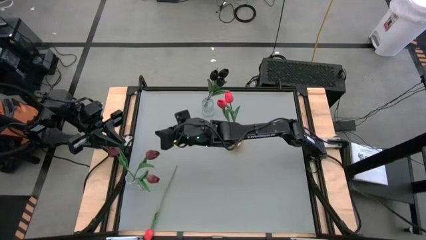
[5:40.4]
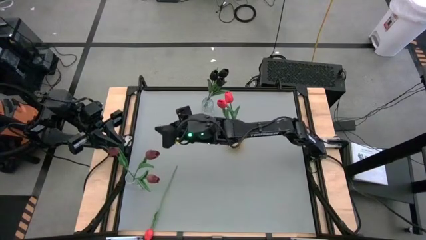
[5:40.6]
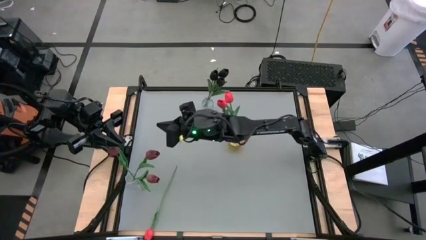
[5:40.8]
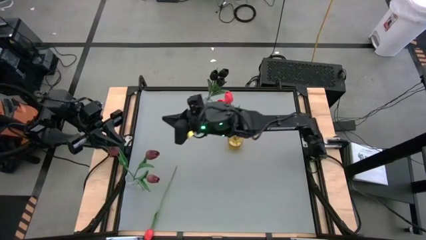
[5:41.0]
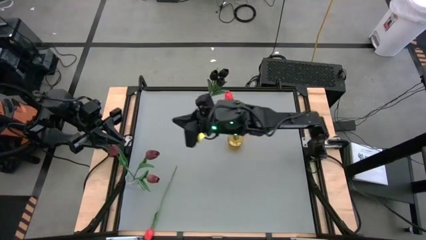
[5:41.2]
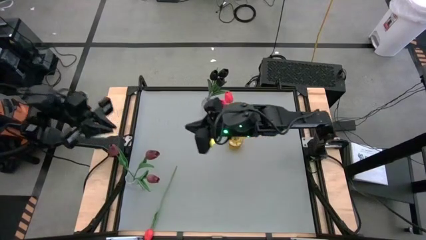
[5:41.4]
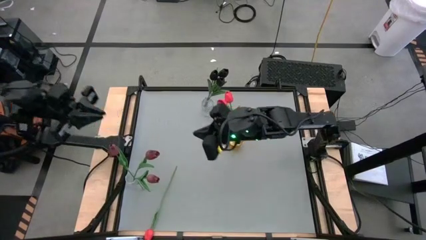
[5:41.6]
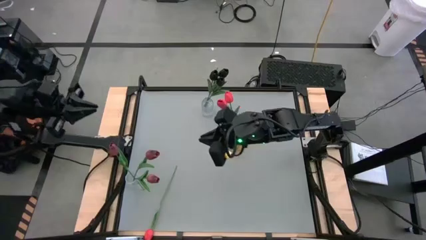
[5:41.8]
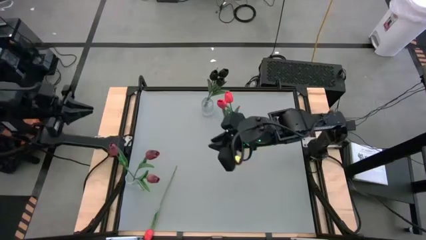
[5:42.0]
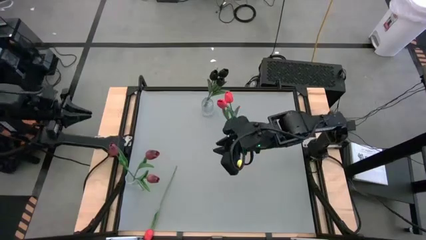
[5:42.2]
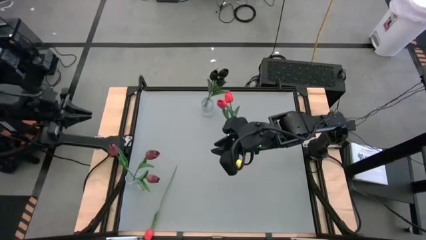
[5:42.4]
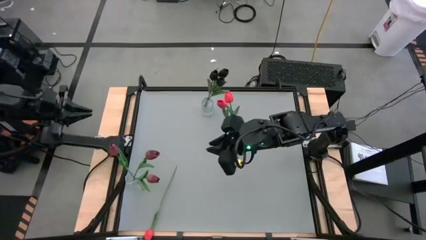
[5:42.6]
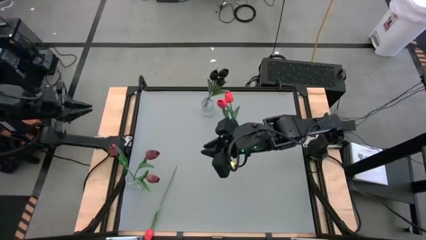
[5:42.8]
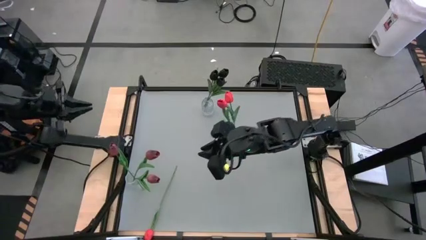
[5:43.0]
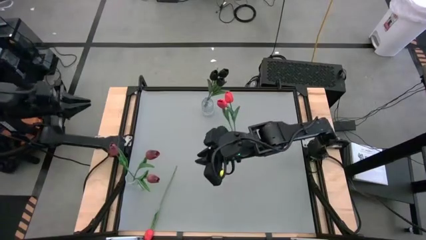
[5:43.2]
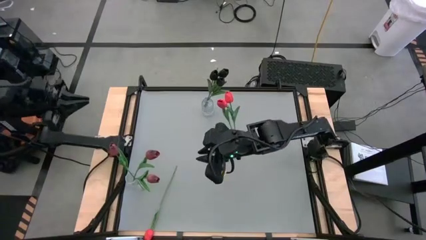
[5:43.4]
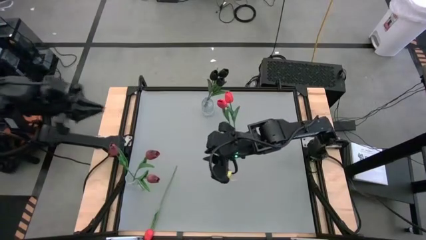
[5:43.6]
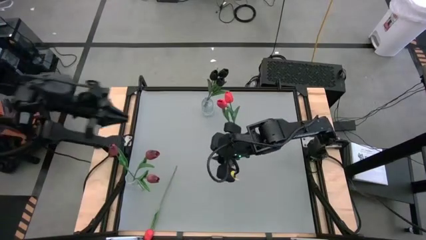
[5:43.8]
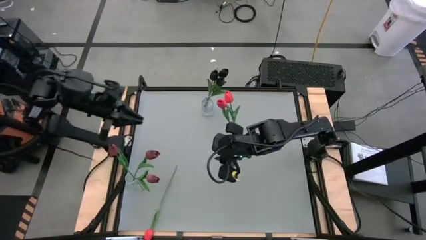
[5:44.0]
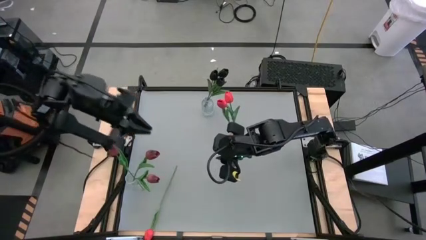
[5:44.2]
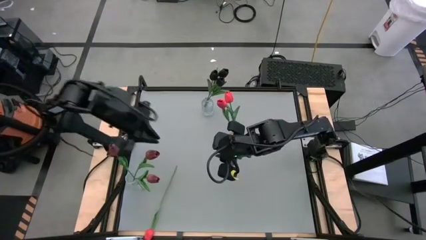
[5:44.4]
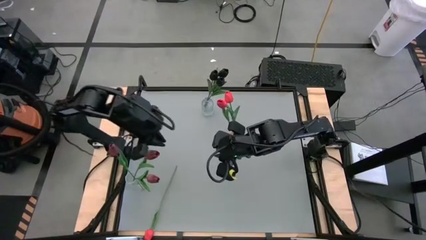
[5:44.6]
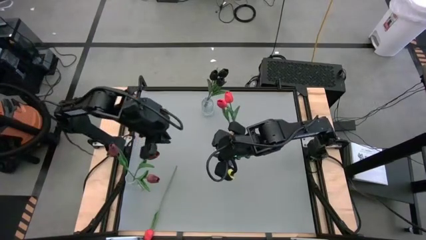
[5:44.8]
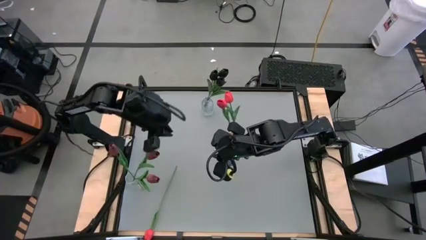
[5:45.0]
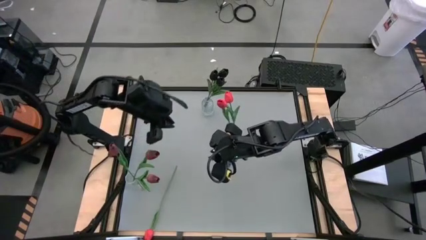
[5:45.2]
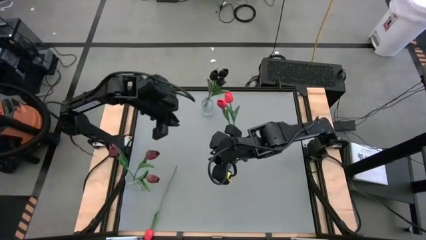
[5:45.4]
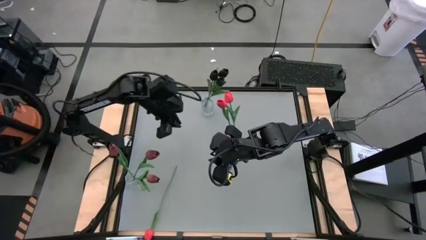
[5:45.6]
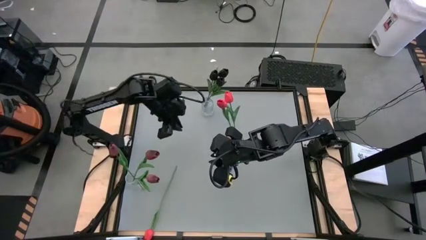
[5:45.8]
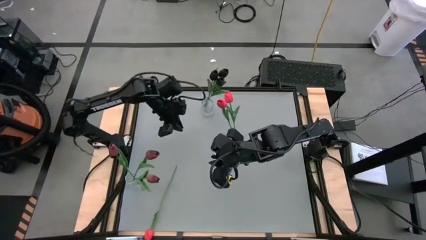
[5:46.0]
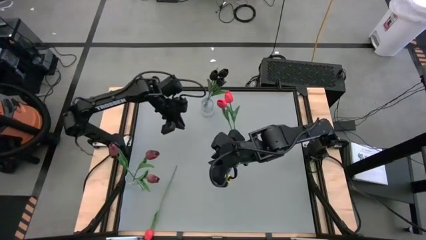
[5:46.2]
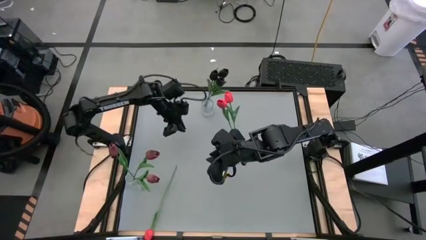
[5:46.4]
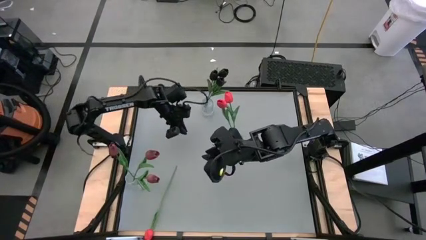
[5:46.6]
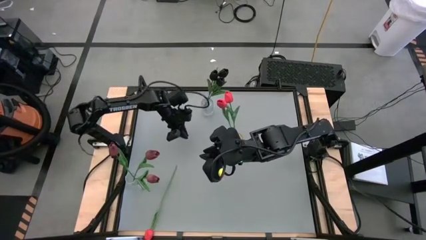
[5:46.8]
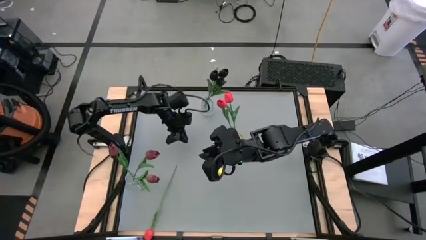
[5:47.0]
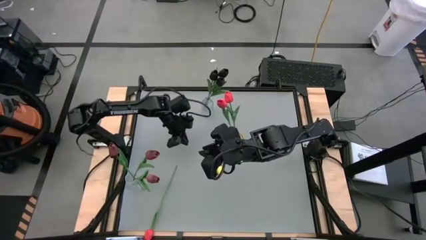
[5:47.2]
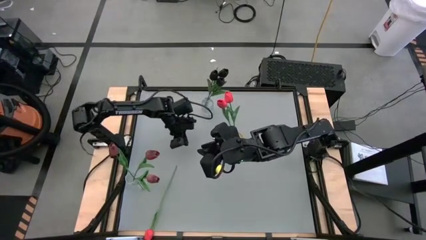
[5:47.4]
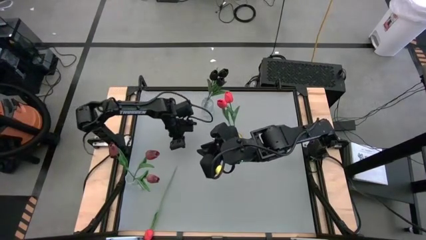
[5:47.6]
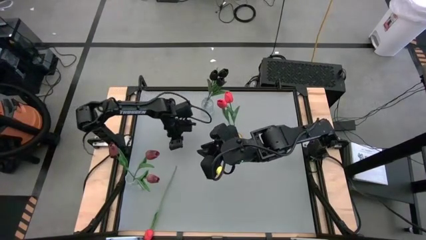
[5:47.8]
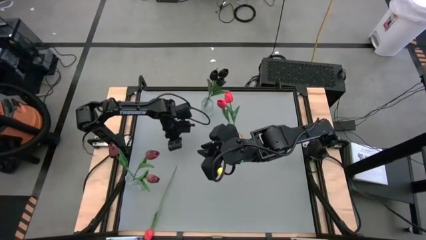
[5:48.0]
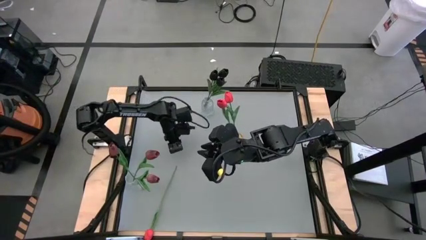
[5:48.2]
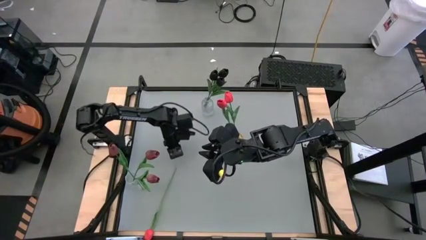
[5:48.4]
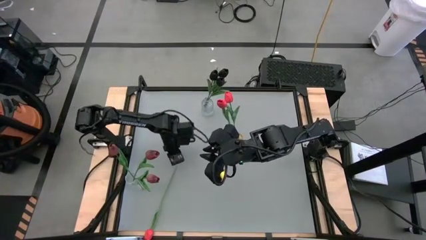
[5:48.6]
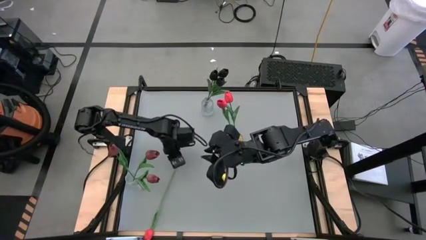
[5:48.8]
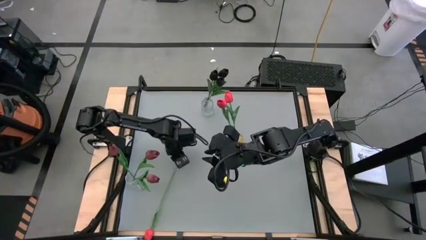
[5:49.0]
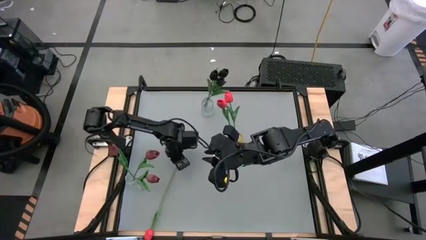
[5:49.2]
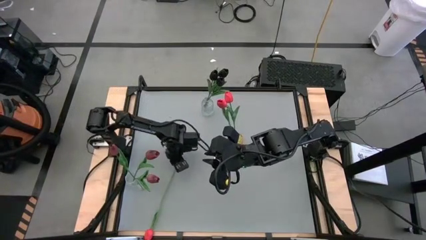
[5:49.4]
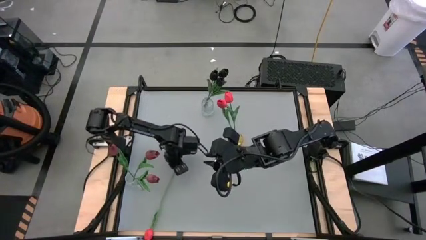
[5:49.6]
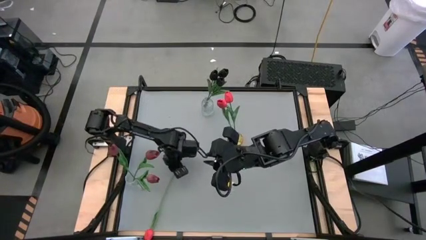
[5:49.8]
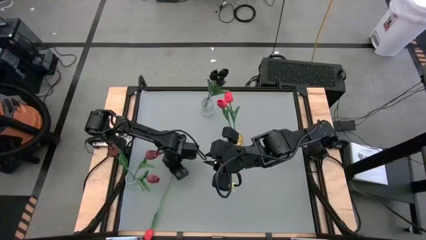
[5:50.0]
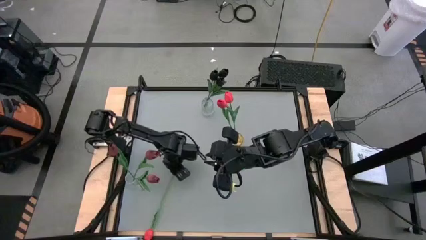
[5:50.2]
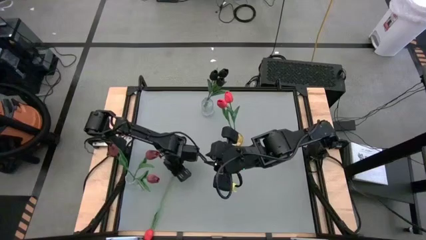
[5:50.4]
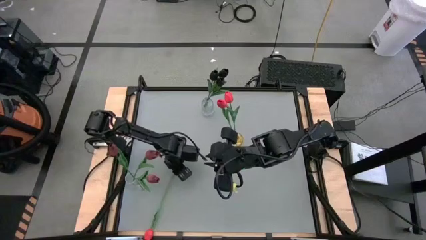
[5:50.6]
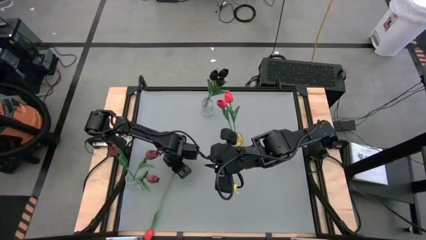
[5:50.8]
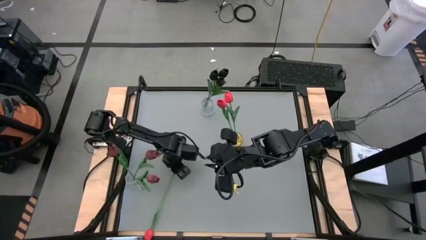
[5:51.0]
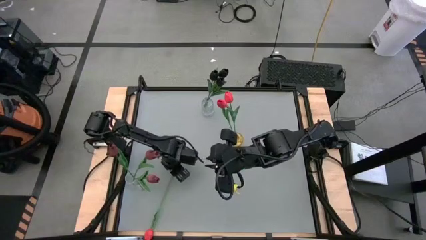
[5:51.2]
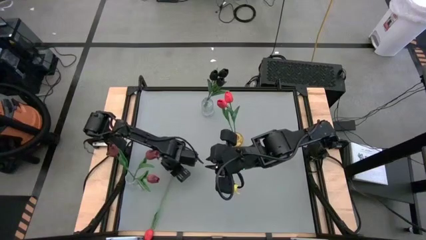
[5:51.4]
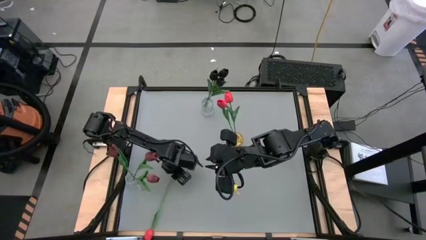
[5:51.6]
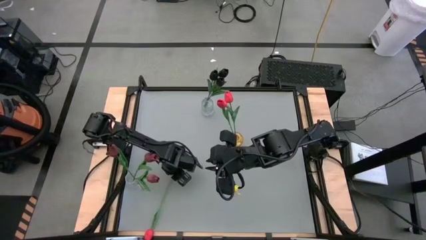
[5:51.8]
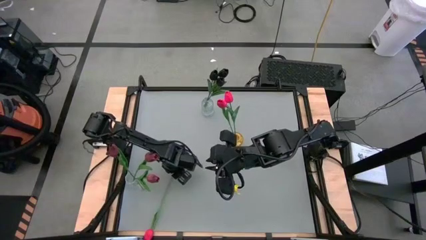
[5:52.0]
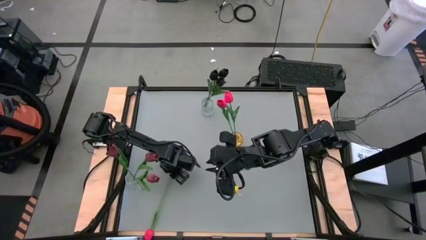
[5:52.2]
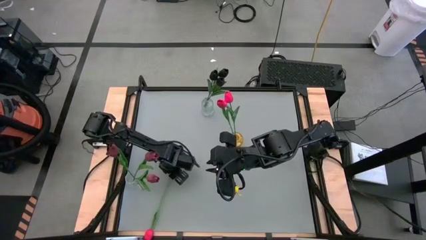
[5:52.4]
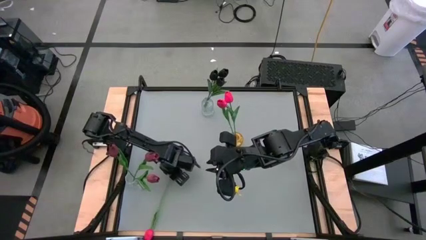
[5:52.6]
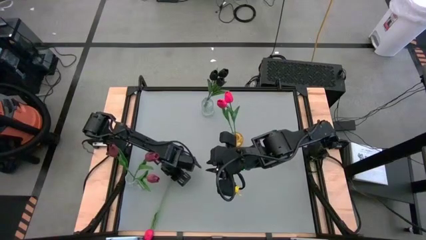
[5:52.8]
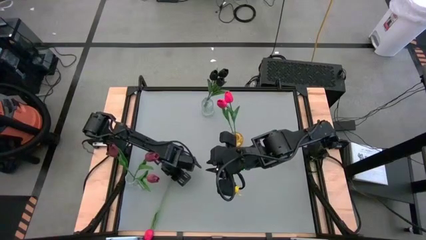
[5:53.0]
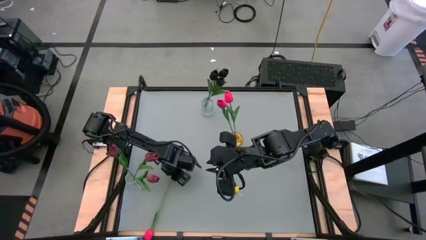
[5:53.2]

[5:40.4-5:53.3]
Task: Sort flowers into vase by color
Put the pink tulip into the yellow vase

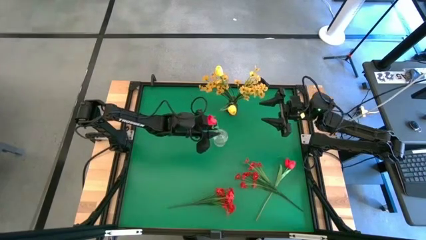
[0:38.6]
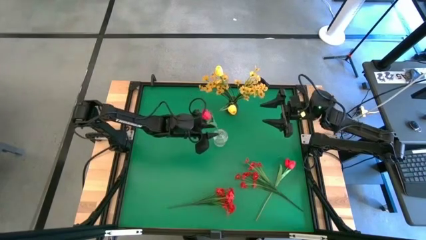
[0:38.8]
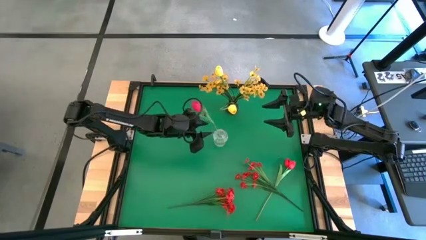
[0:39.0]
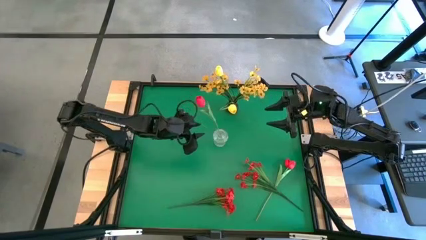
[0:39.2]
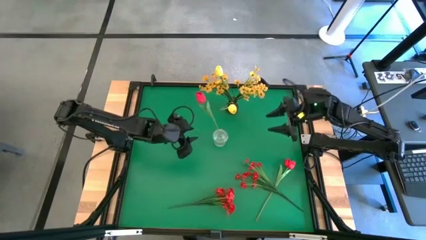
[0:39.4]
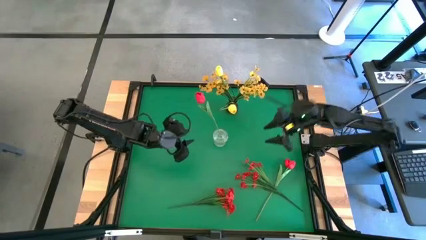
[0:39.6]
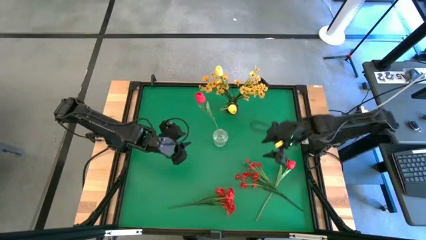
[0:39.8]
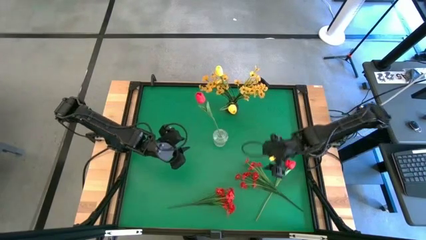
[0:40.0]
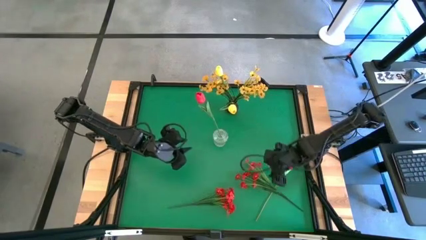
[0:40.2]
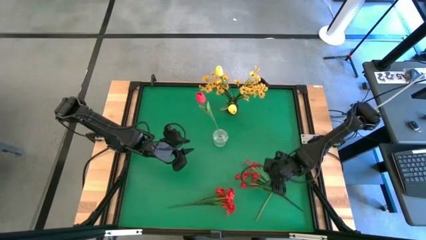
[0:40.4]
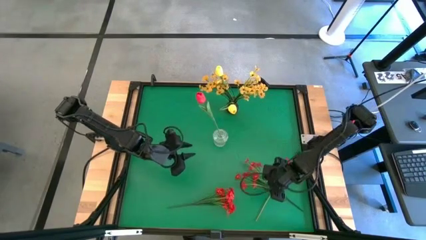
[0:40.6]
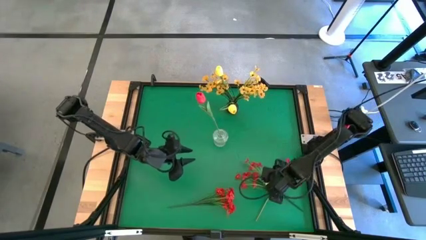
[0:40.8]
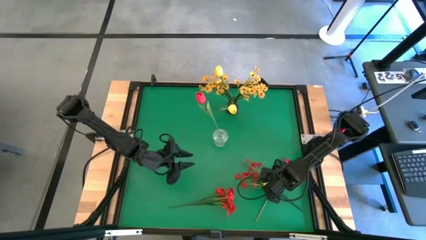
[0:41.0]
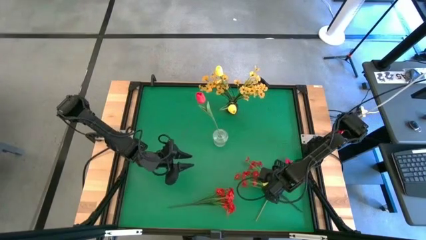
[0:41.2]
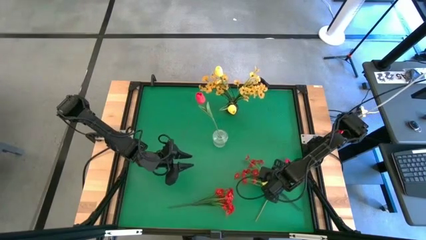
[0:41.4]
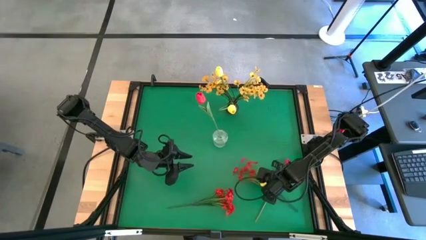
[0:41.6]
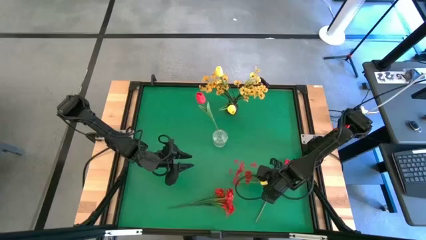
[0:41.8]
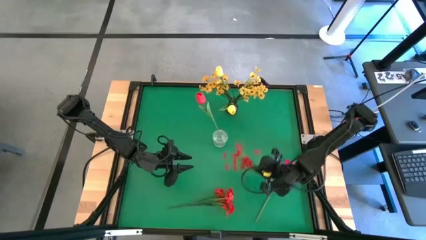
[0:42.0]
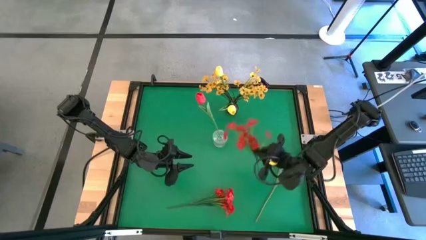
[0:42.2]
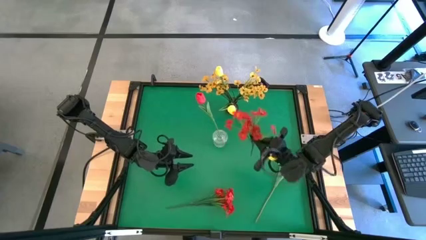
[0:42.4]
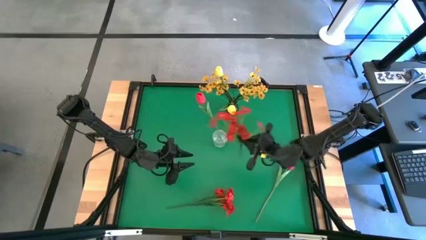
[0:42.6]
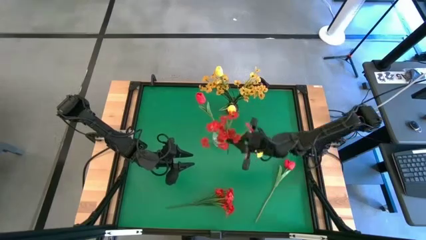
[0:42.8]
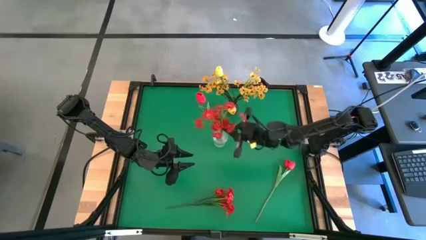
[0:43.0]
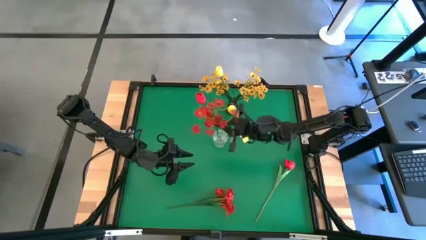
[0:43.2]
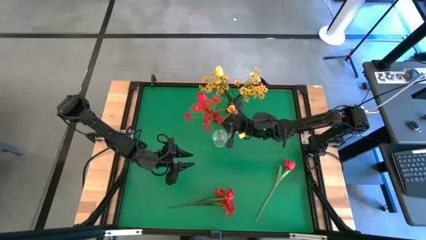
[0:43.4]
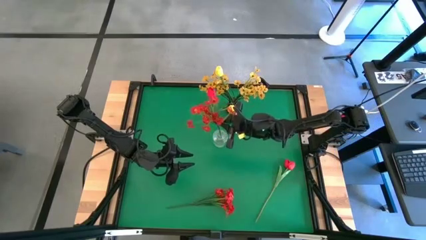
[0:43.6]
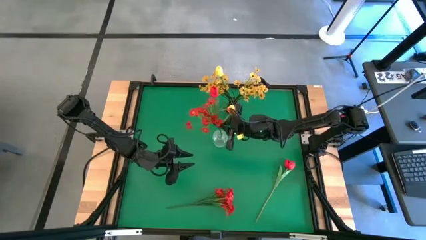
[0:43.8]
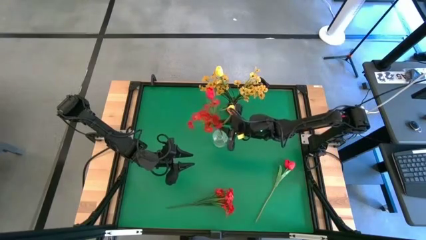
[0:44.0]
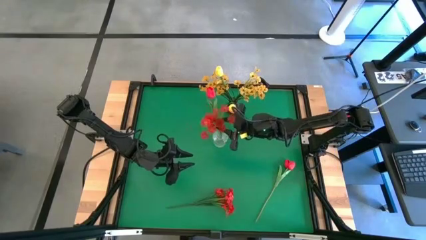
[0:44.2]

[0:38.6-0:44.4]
Task: Sort flowers into vase by color
Put the red flowers into the transparent vase
